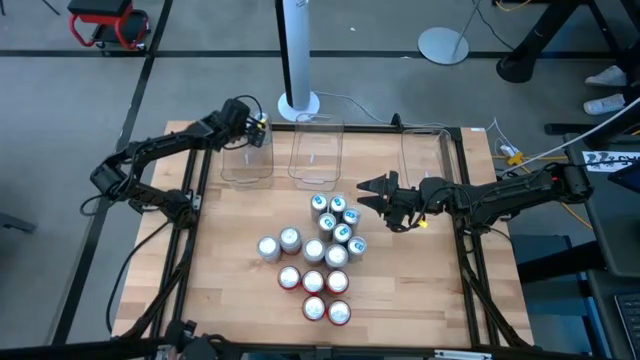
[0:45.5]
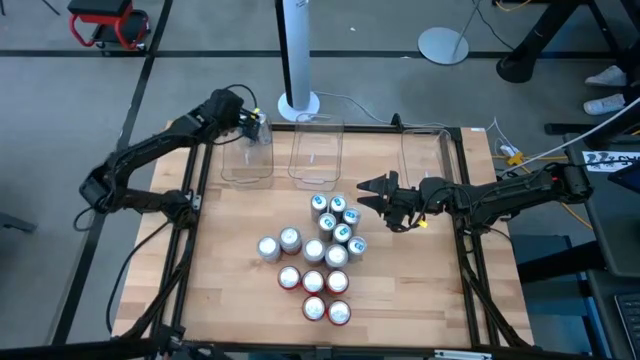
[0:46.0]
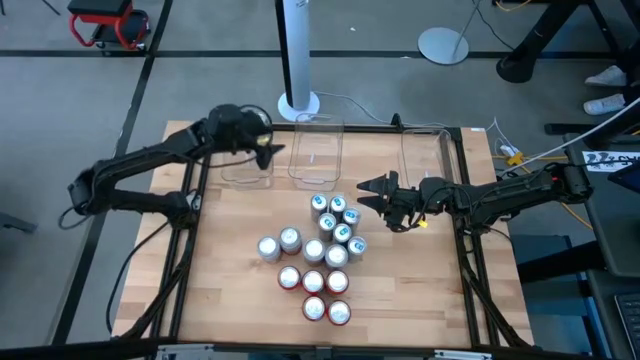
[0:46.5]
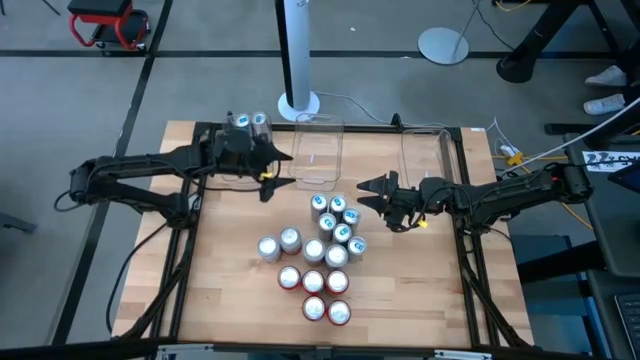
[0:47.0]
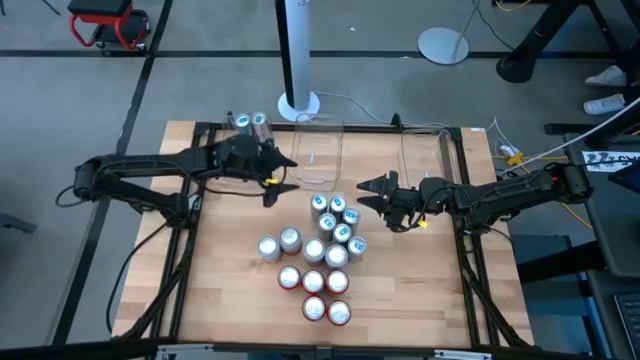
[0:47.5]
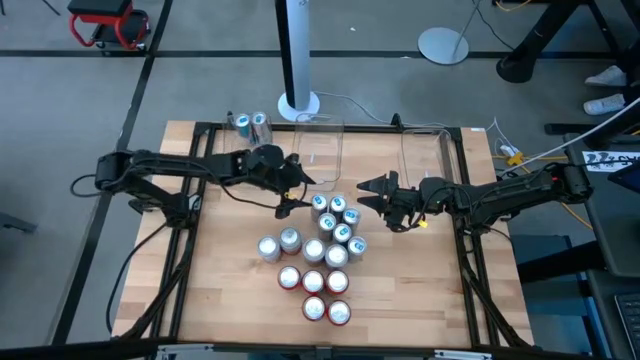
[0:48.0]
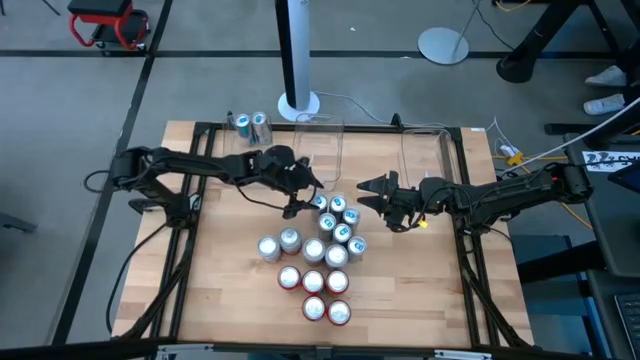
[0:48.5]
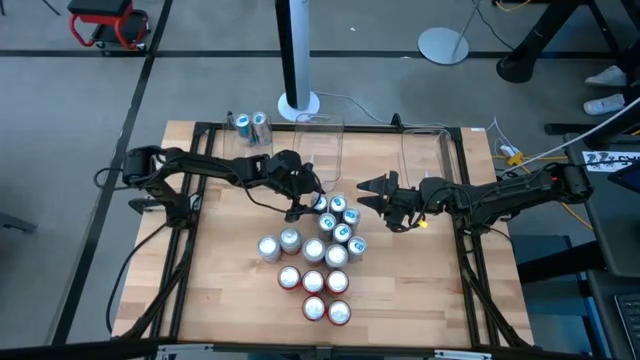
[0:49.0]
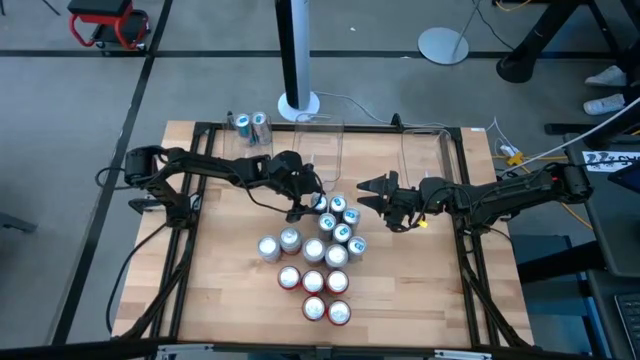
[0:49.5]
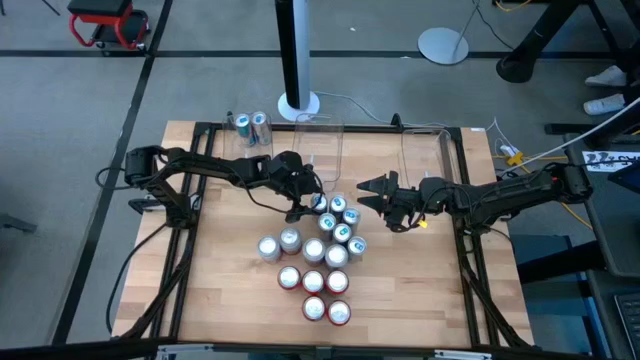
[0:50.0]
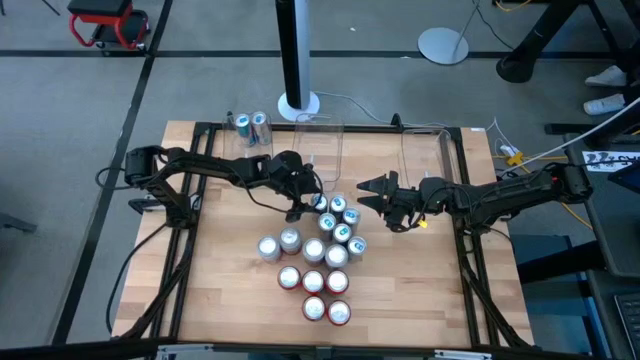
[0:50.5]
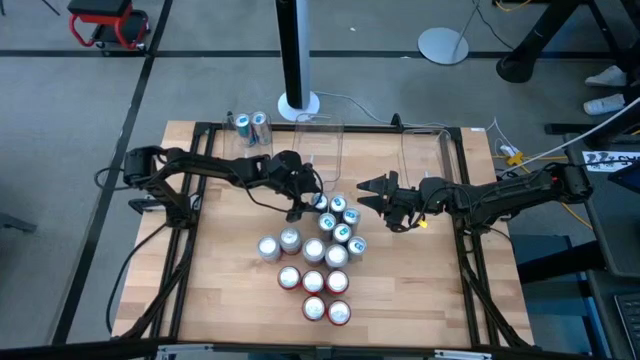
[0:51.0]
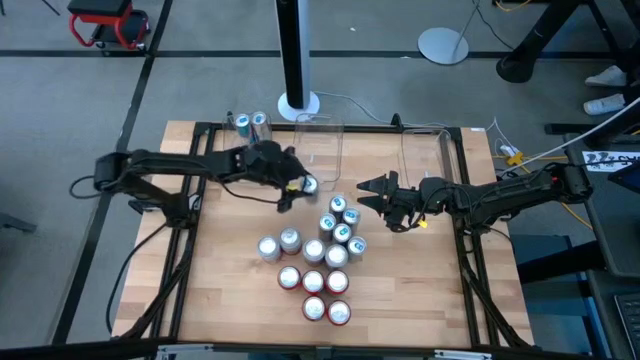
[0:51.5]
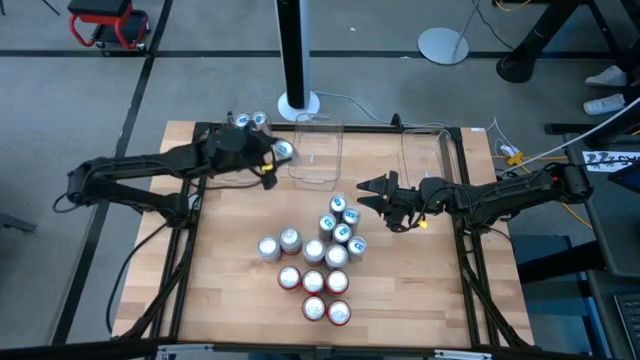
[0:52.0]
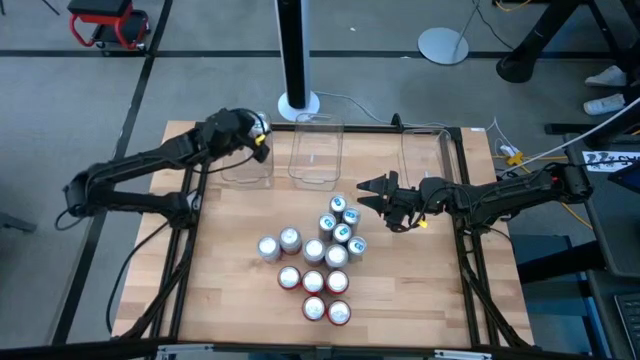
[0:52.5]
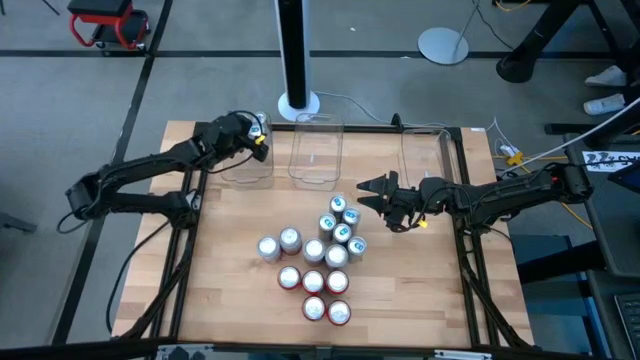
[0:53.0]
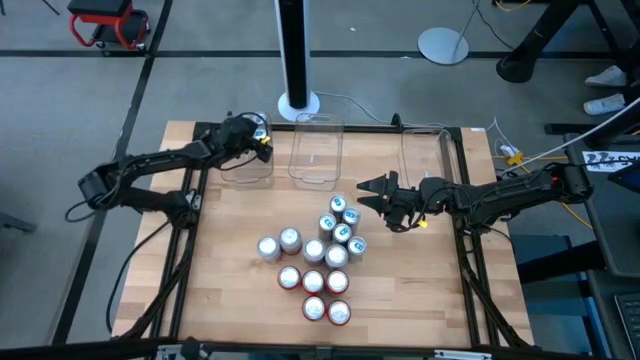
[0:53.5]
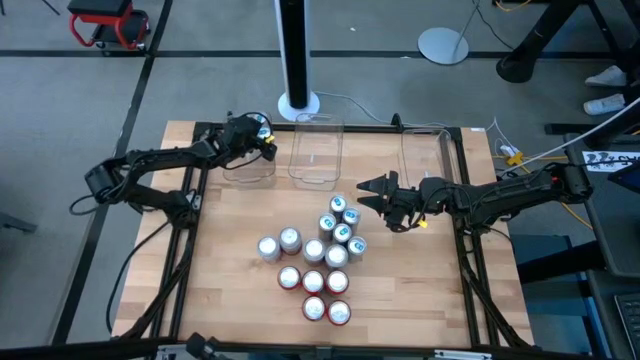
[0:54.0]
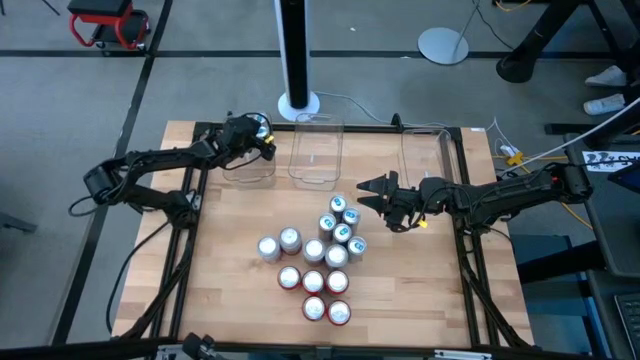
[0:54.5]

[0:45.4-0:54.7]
Task: Sort soda cans
Put the blue soda can into the left transparent bin

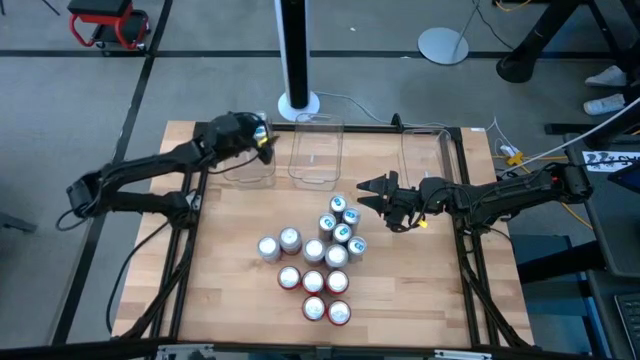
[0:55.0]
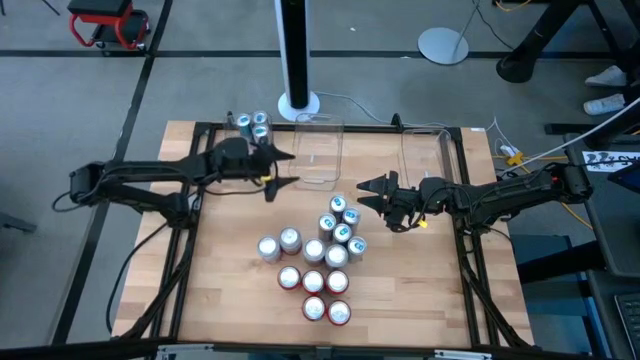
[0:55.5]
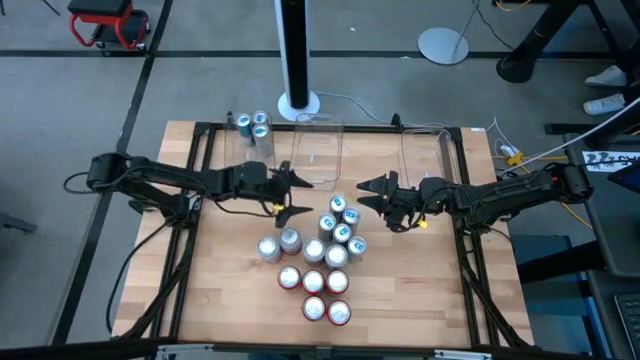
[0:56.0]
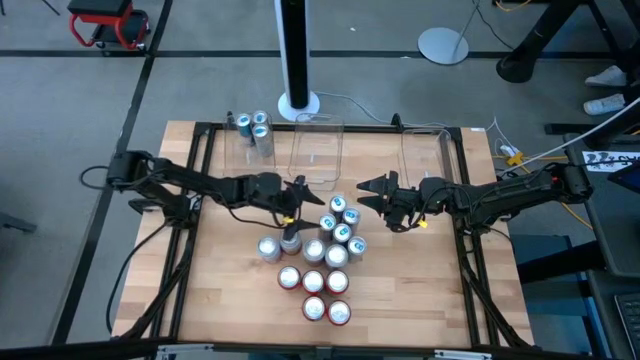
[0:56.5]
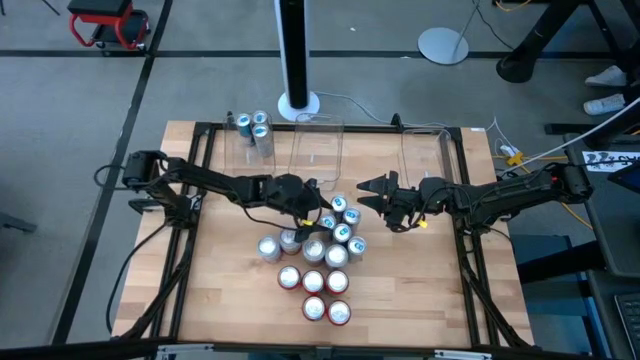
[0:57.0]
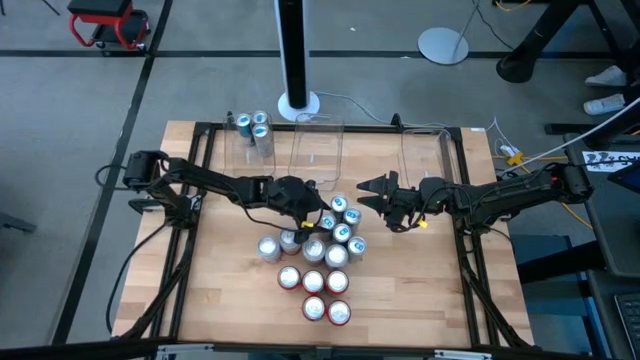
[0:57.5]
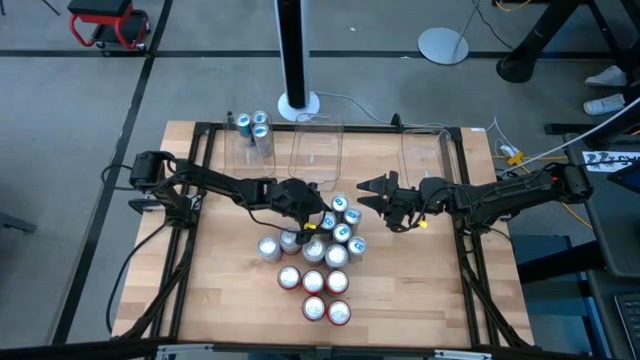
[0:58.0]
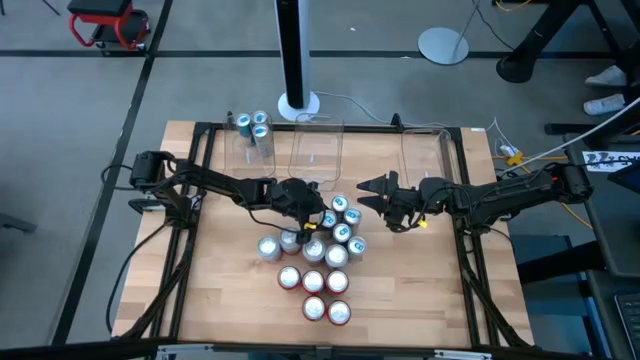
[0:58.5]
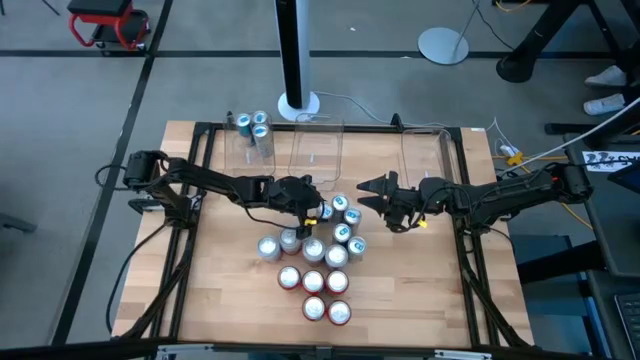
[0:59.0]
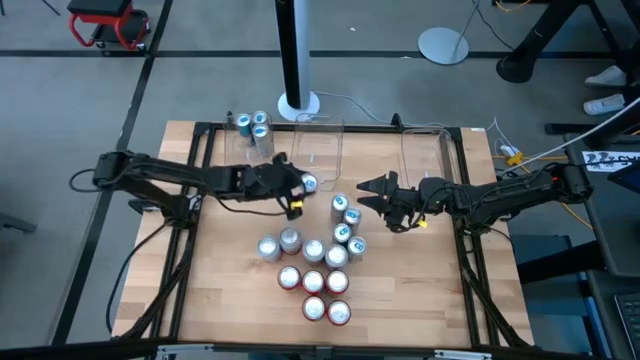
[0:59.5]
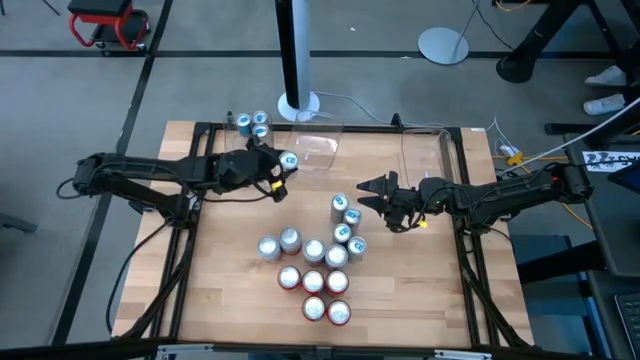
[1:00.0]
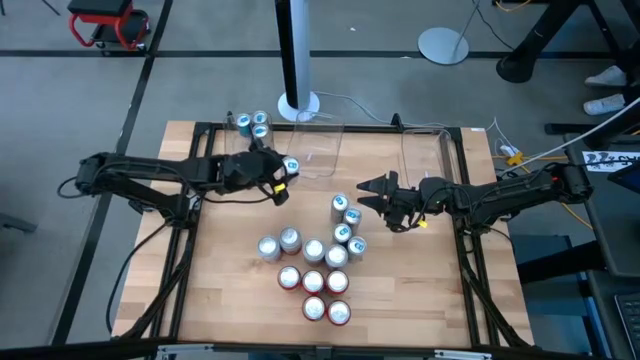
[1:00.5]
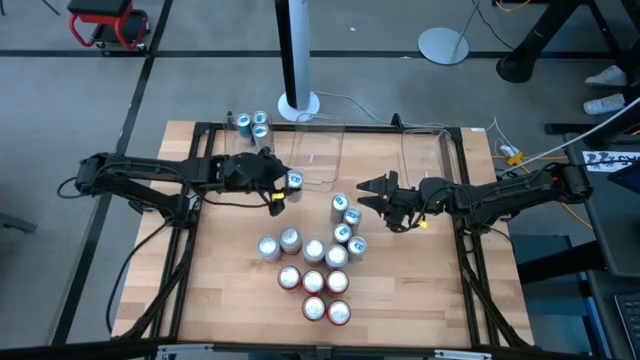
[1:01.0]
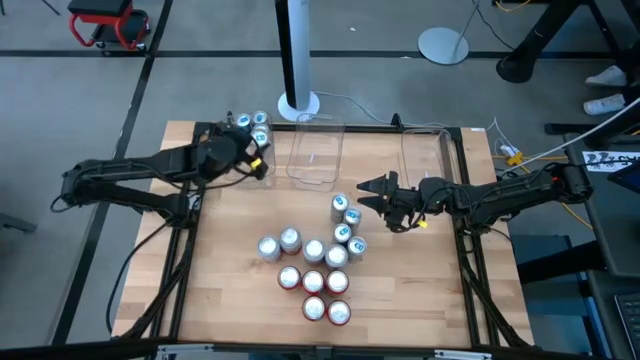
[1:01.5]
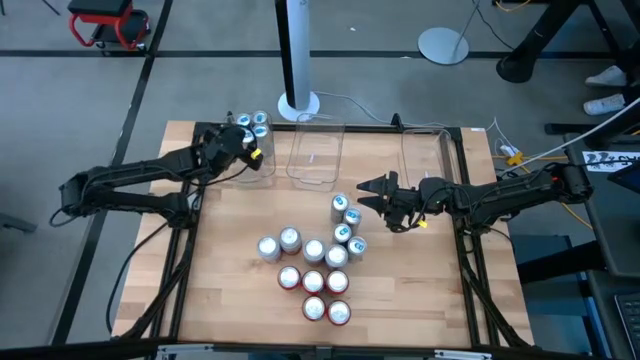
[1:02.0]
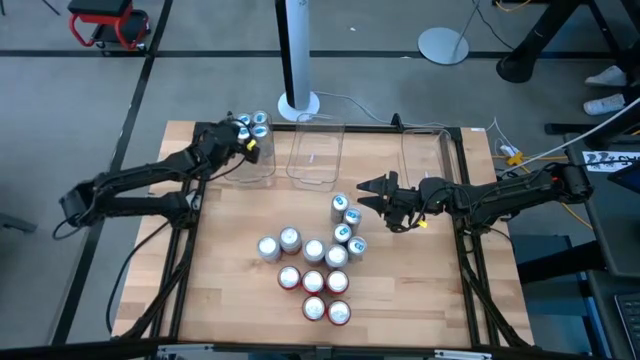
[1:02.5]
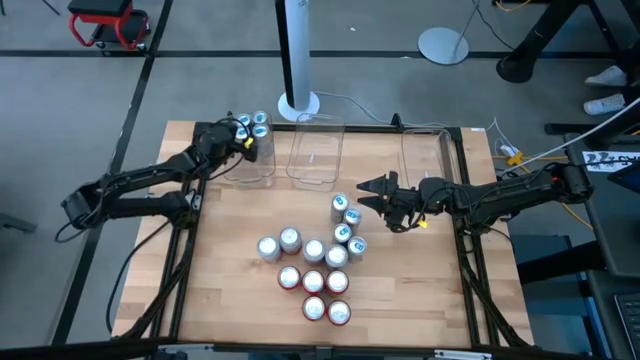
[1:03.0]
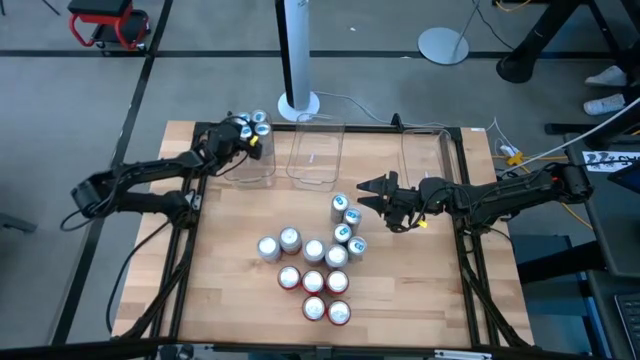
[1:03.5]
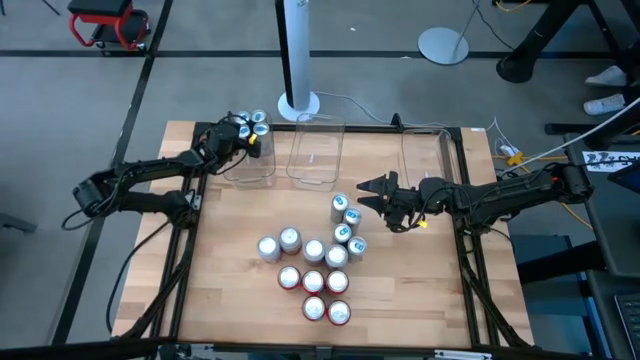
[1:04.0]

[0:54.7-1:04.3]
Put the blue soda can into the left transparent bin

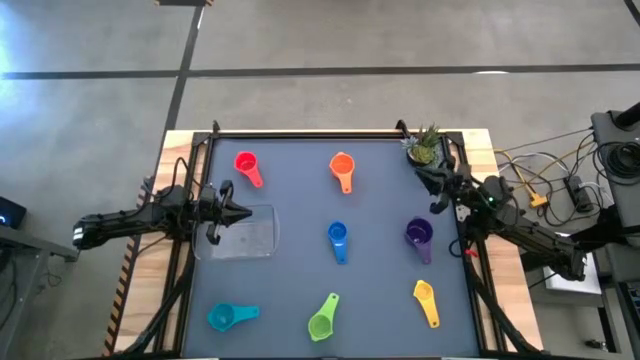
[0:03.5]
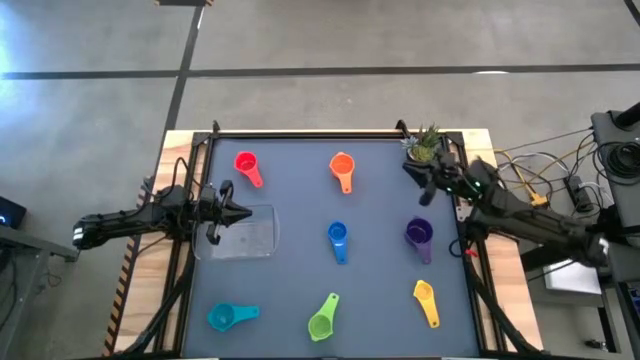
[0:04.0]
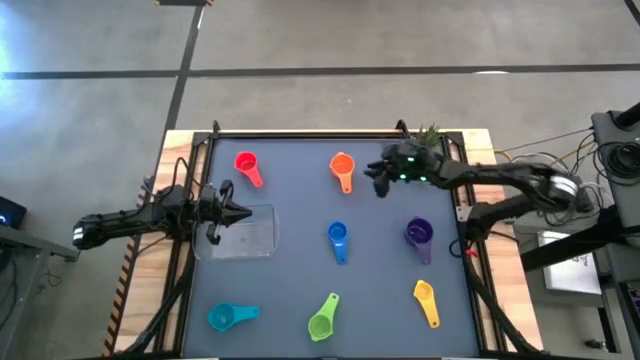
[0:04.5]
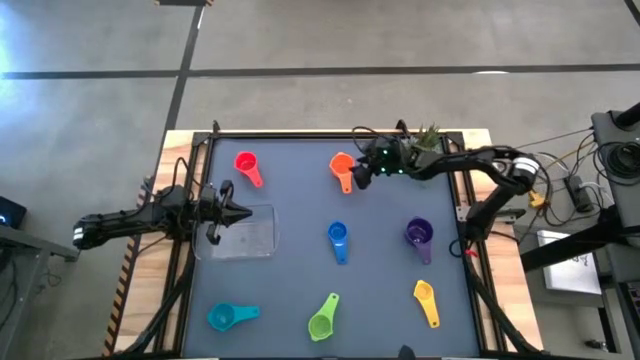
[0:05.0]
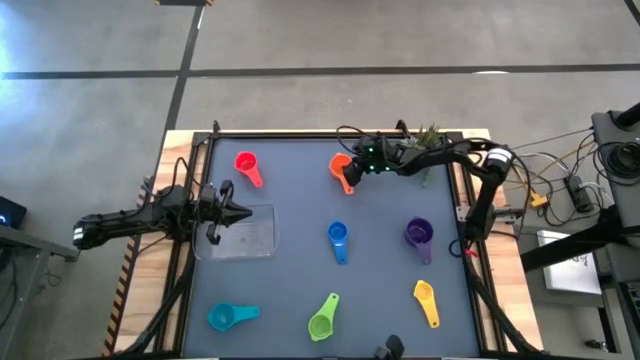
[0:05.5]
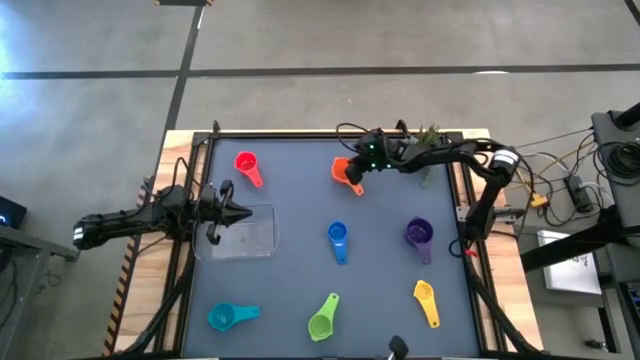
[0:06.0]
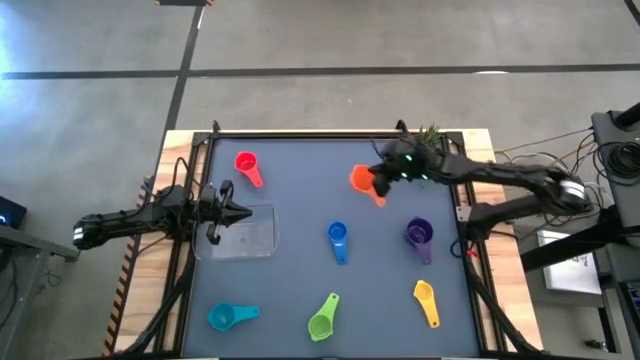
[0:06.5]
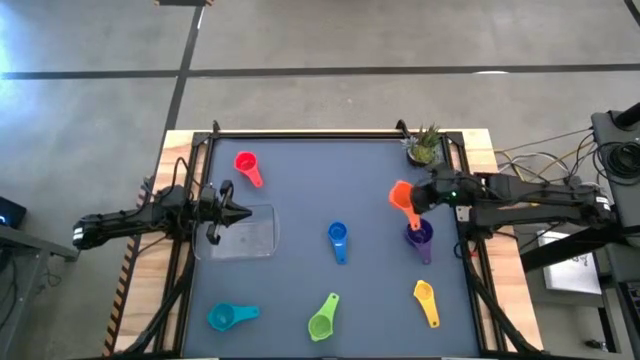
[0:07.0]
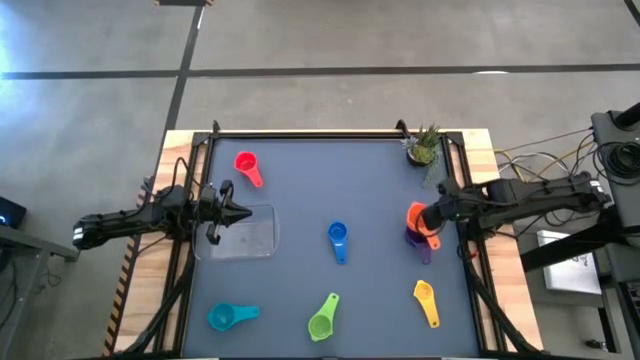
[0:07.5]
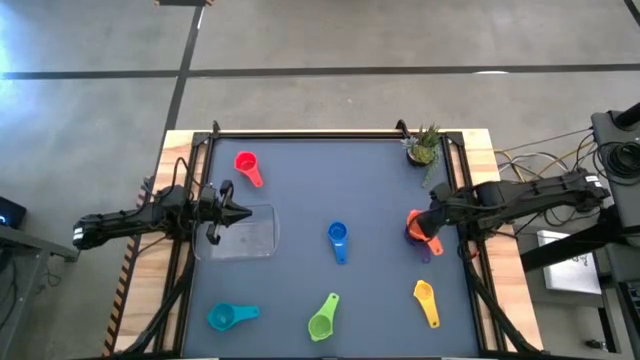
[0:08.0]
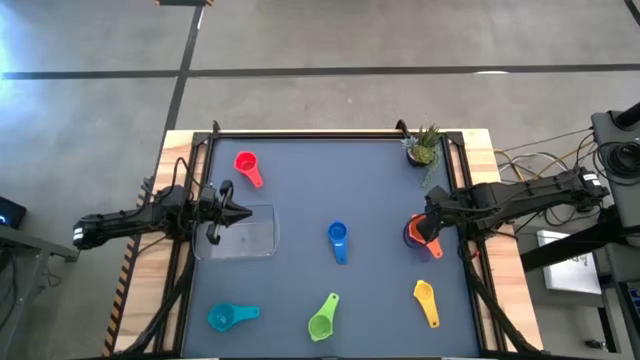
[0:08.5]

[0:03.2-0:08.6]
Task: Nest measuring cups in basket
Stack the orange measuring cup on top of the violet measuring cup
